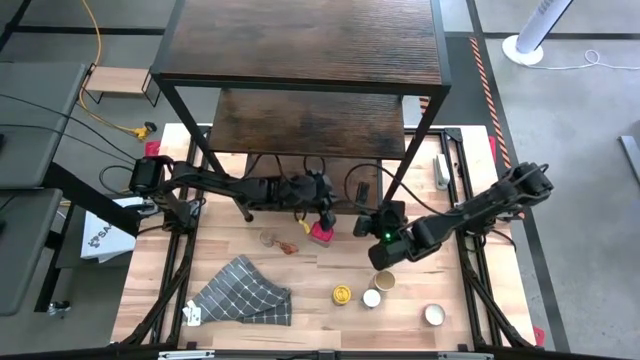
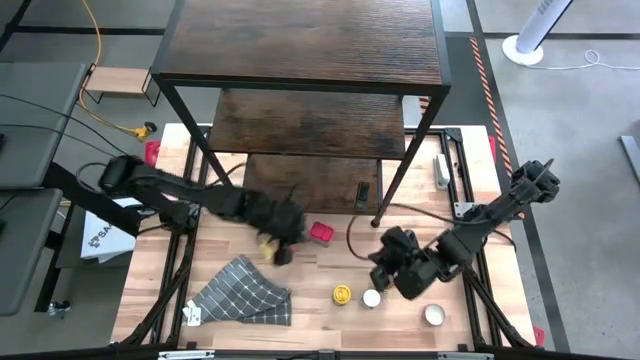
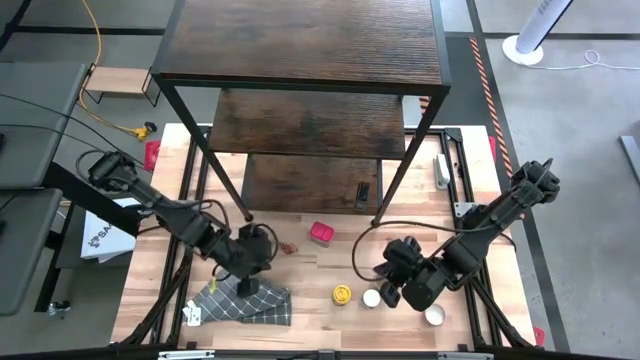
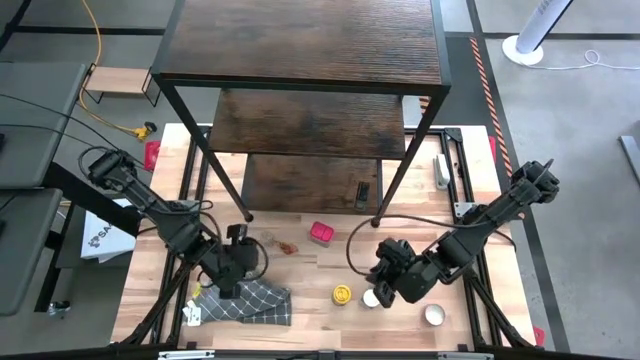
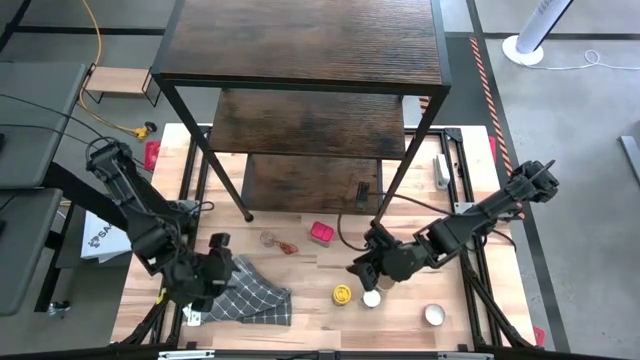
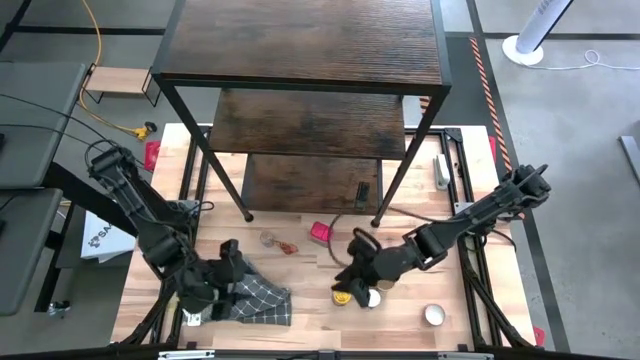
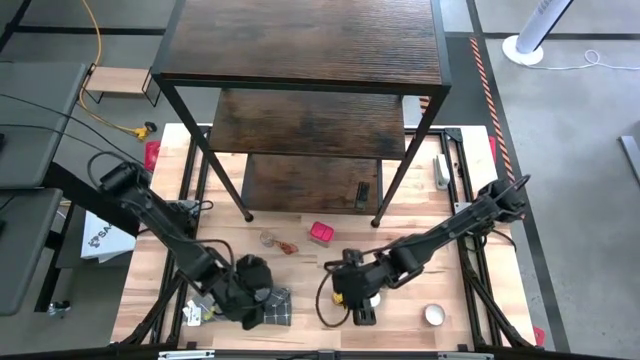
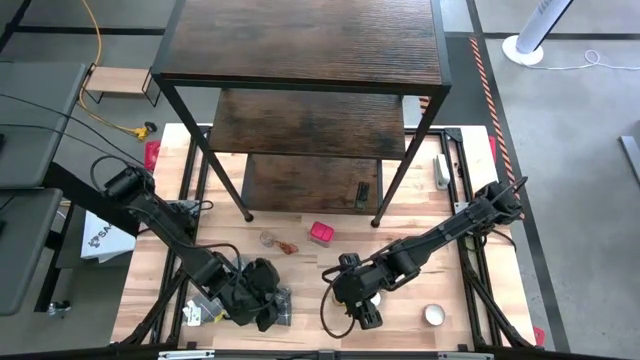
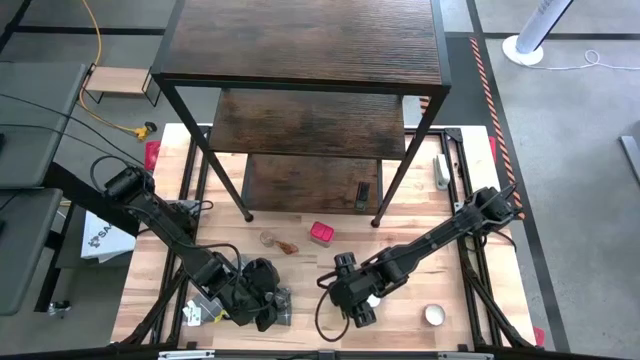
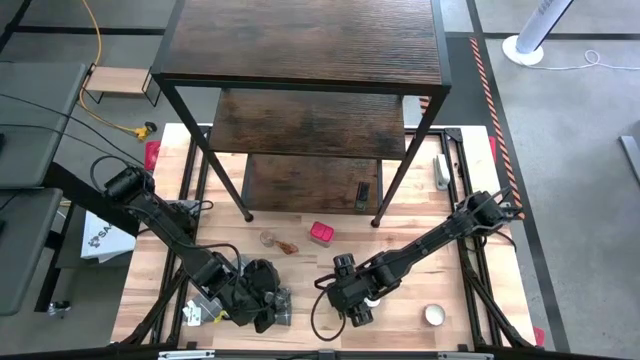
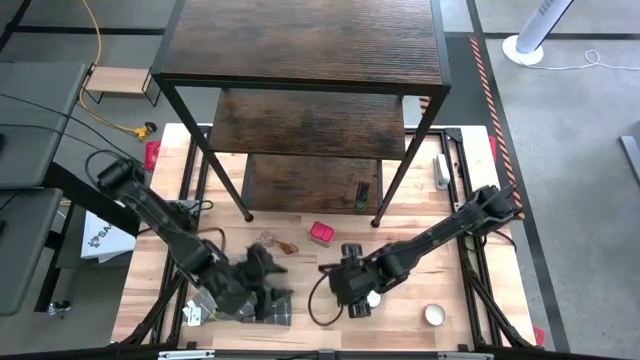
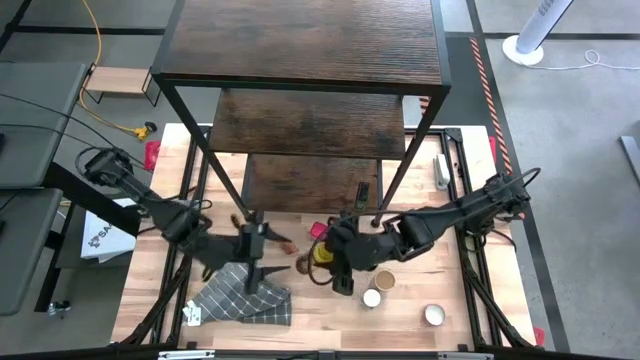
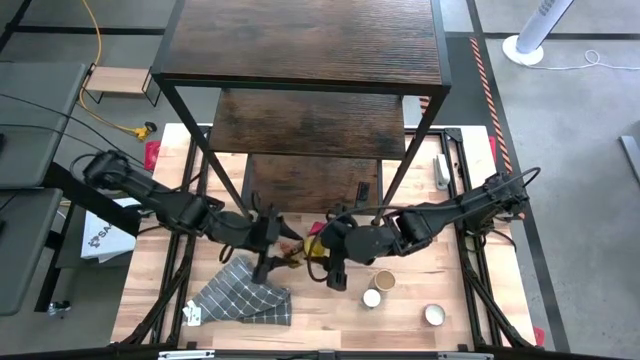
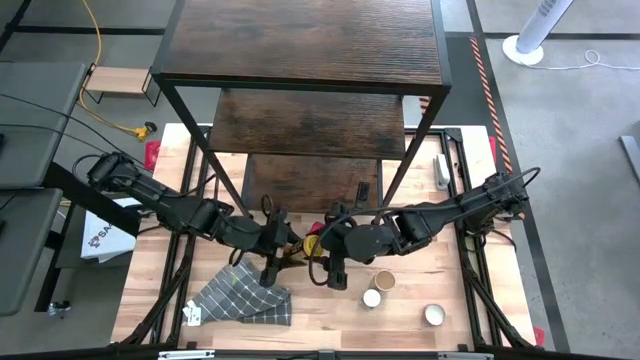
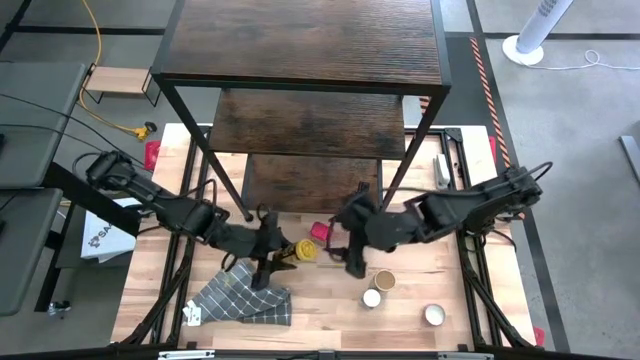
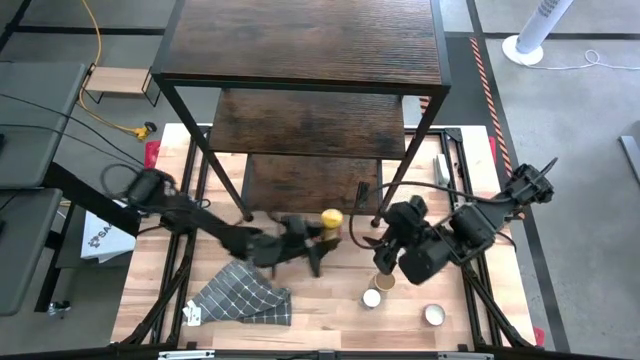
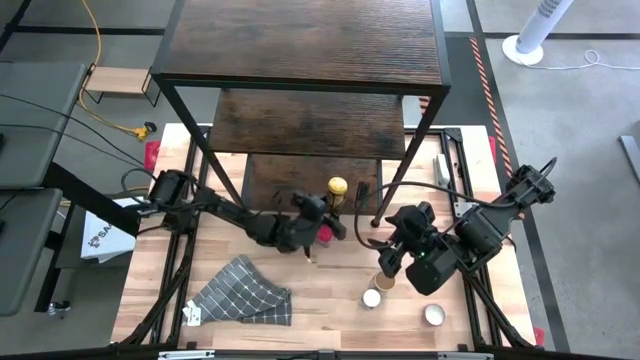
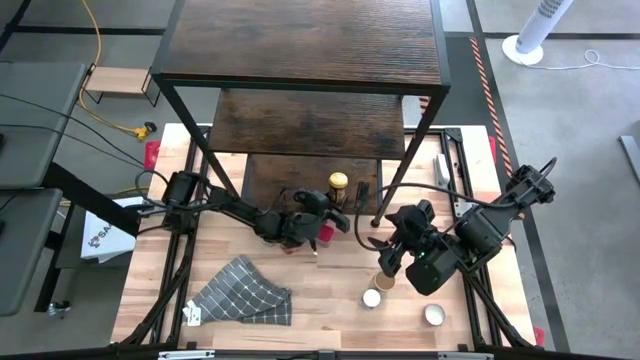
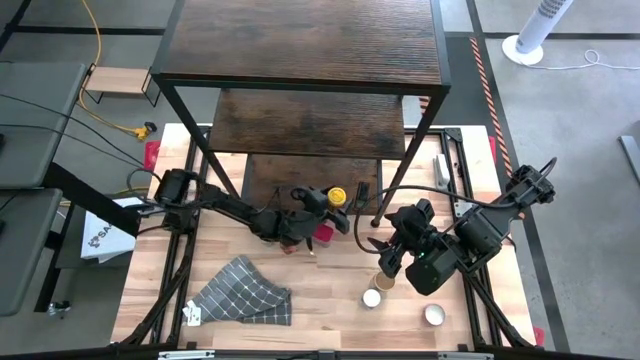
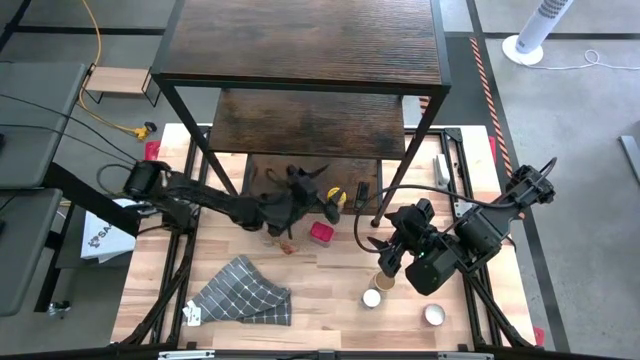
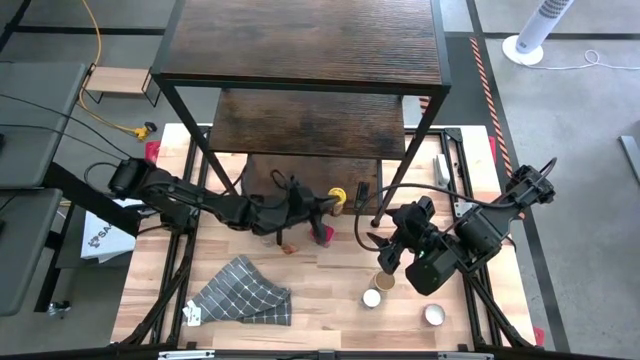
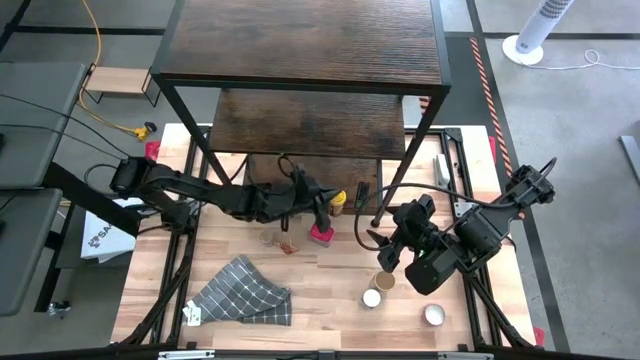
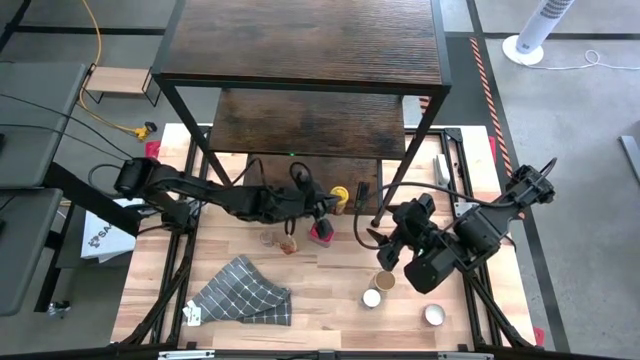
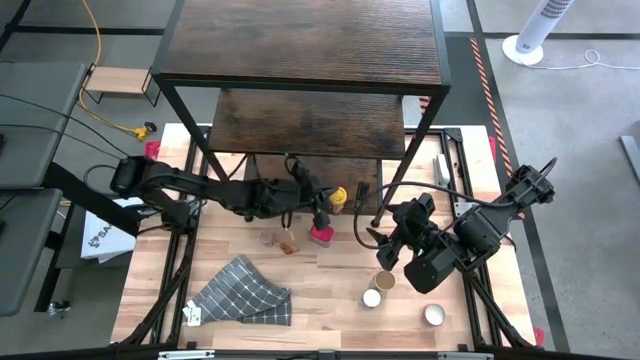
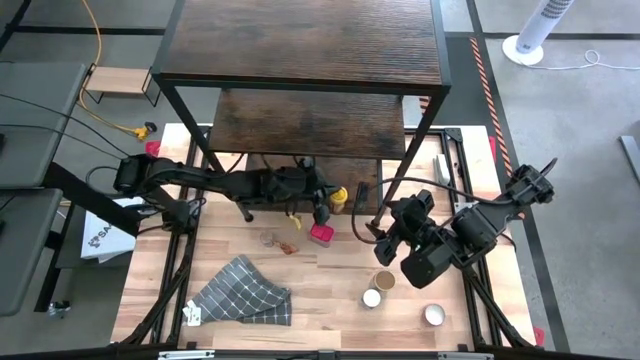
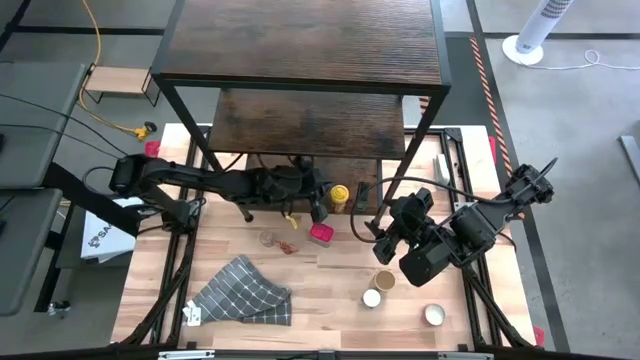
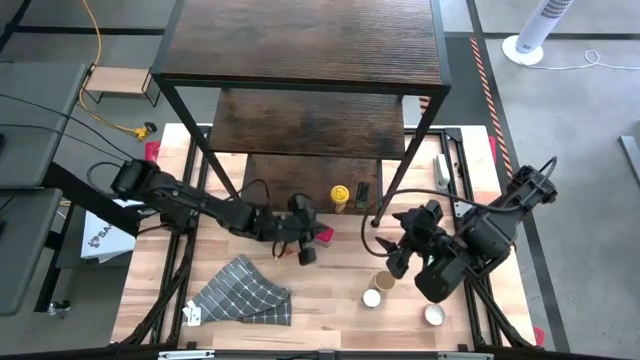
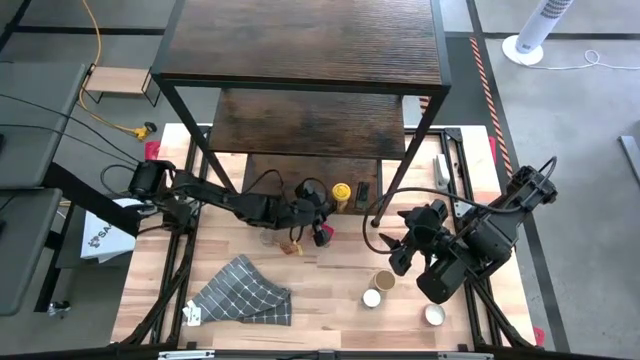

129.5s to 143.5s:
Task: Shelf spices
Put the yellow seasoning bottle on the shelf

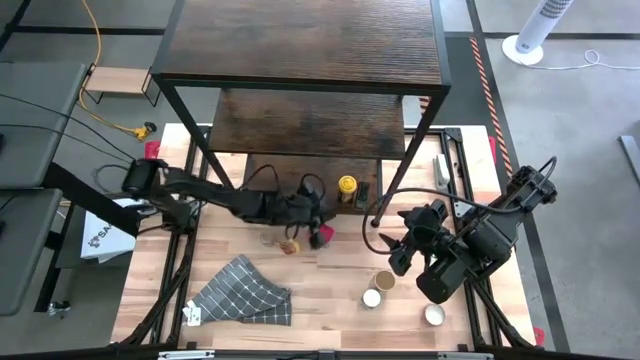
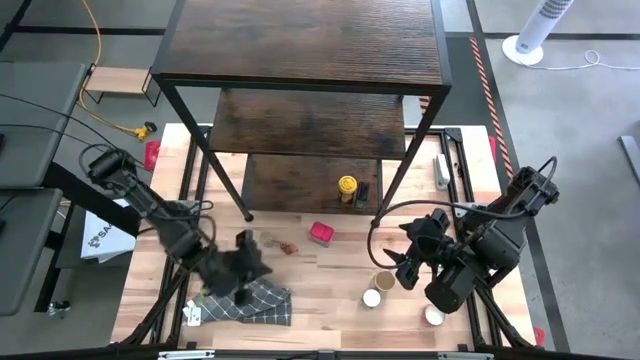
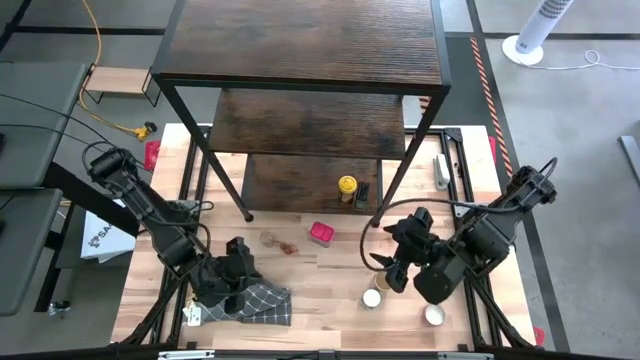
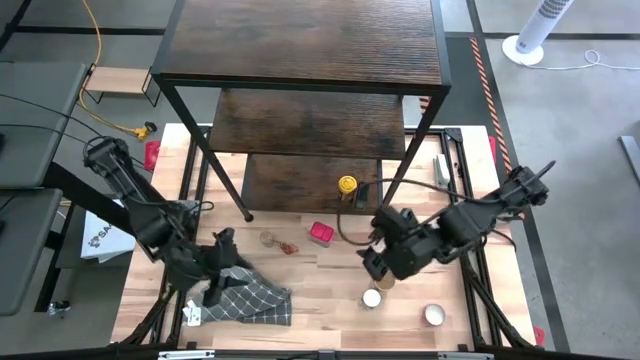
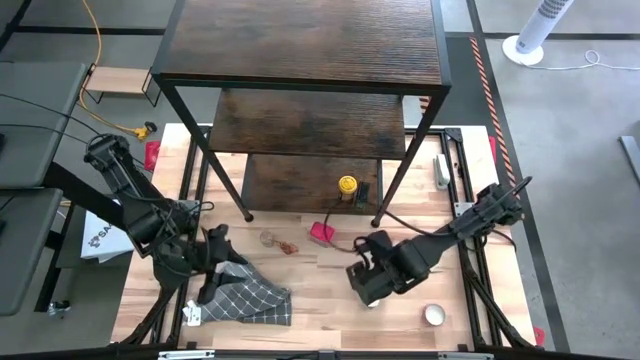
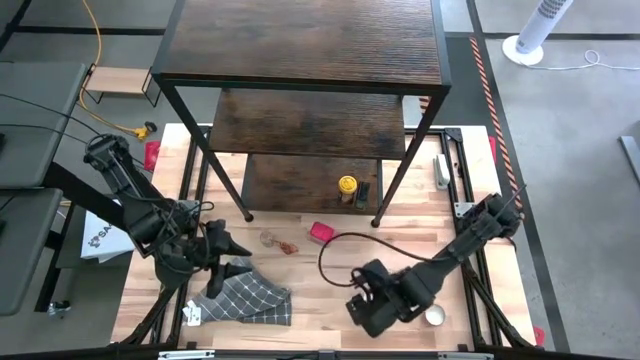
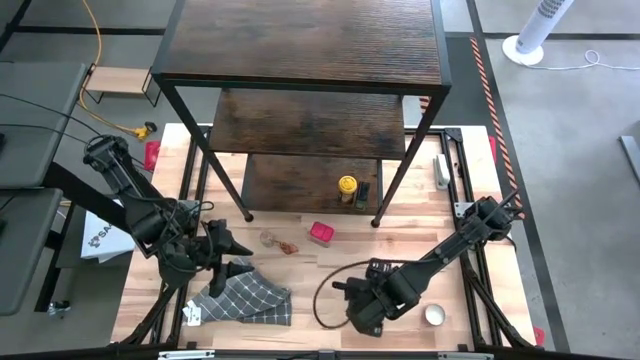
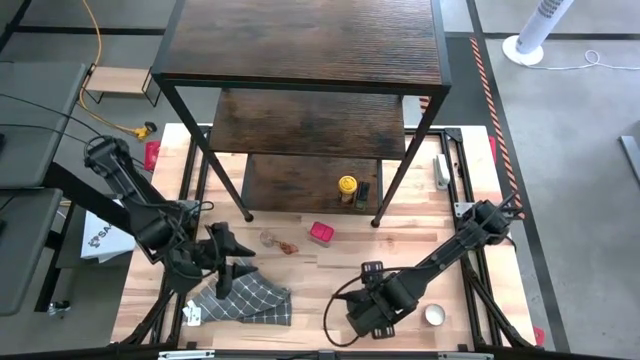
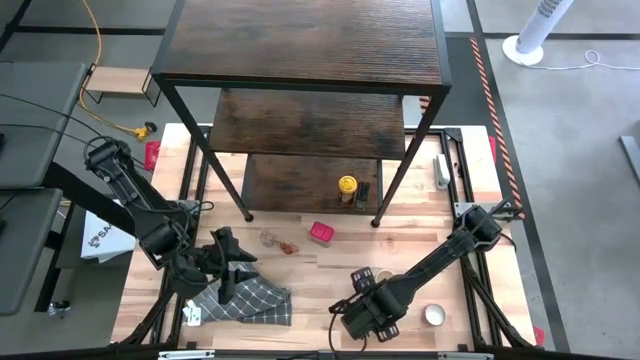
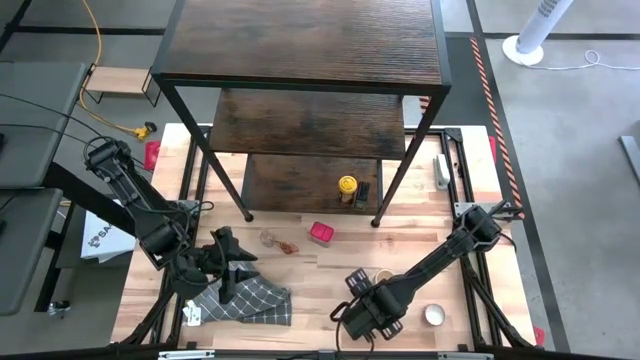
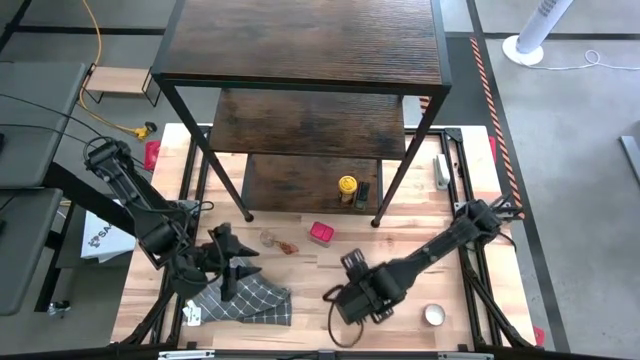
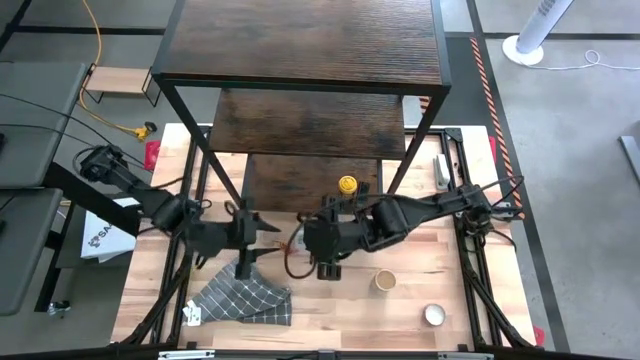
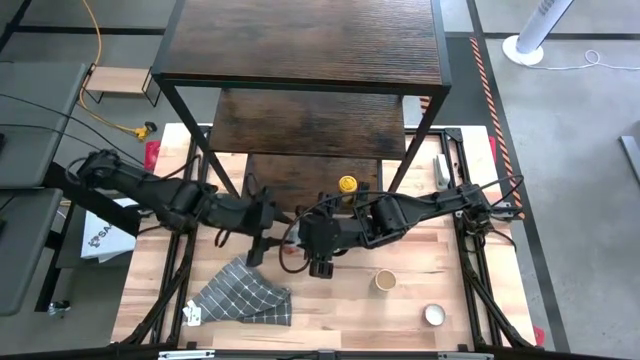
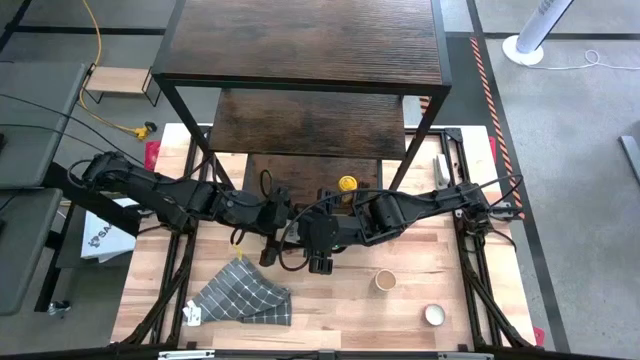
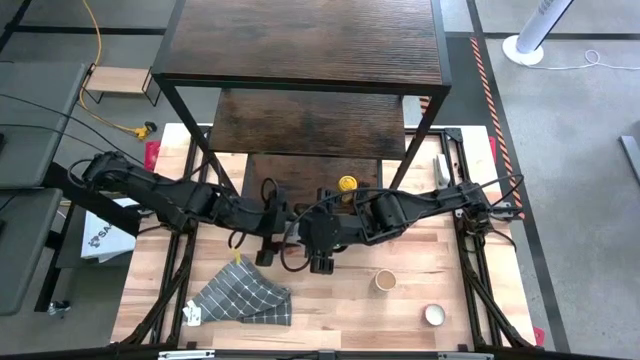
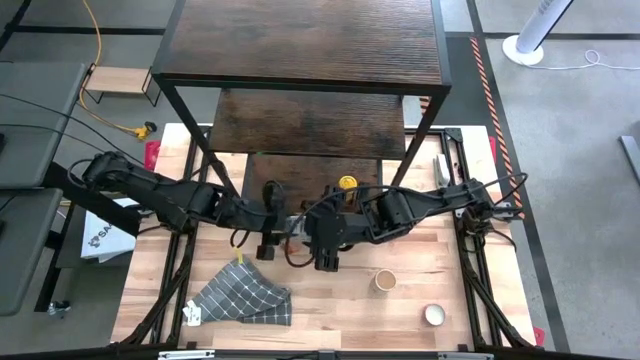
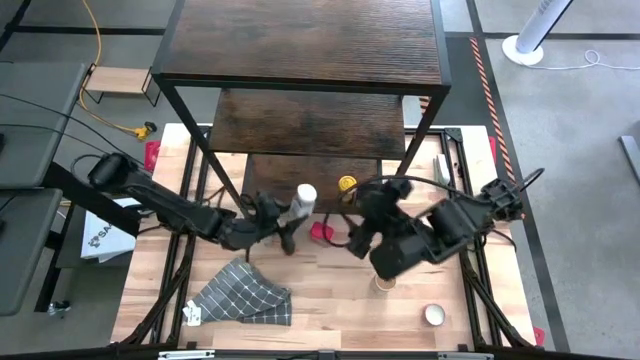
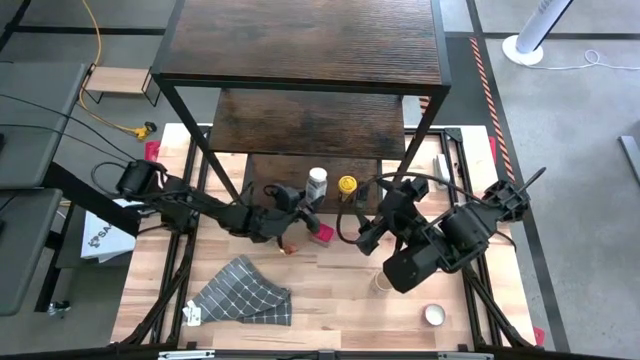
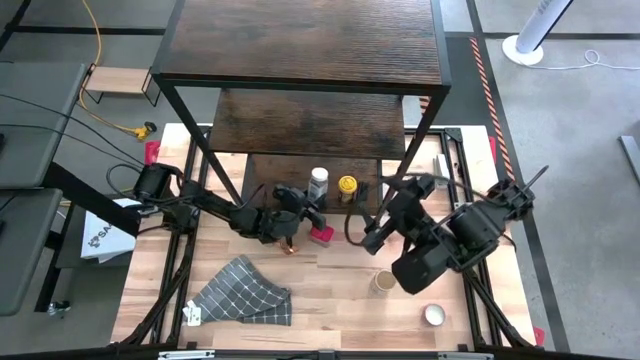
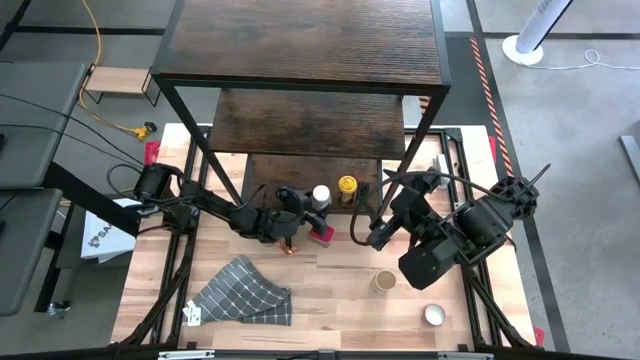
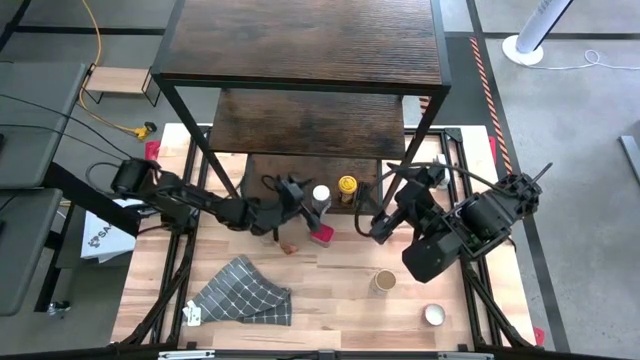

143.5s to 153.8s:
Put the white seasoning bottle on the shelf
